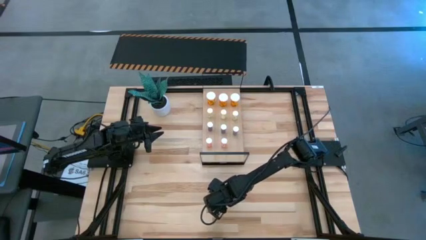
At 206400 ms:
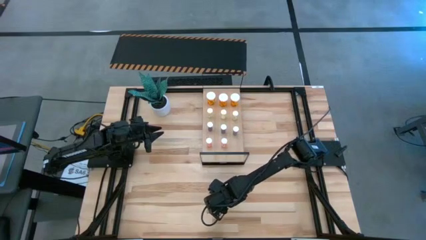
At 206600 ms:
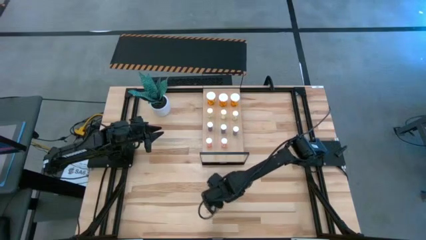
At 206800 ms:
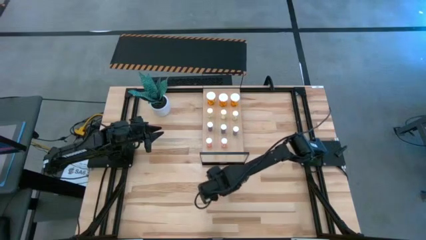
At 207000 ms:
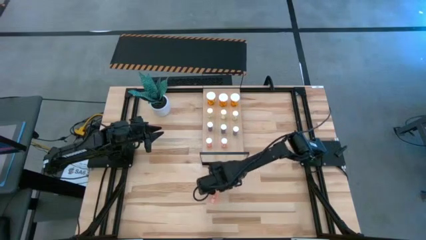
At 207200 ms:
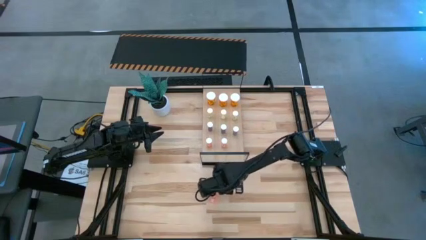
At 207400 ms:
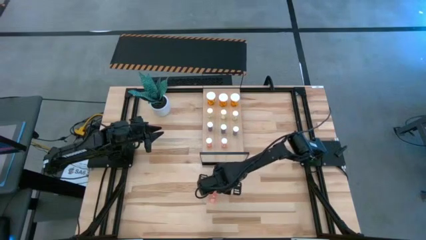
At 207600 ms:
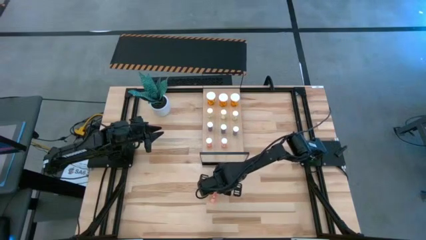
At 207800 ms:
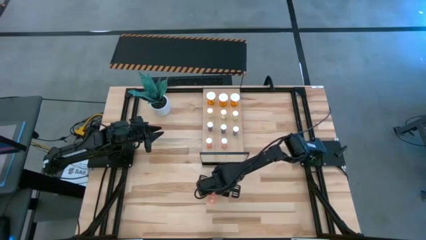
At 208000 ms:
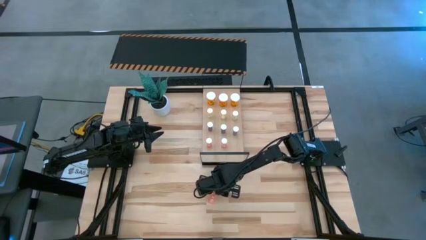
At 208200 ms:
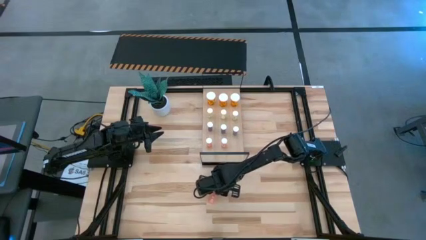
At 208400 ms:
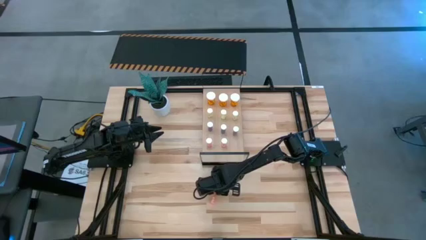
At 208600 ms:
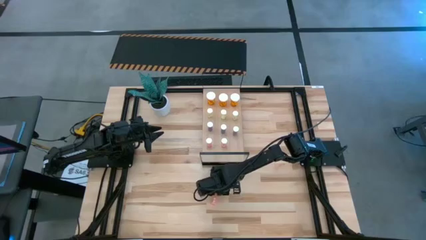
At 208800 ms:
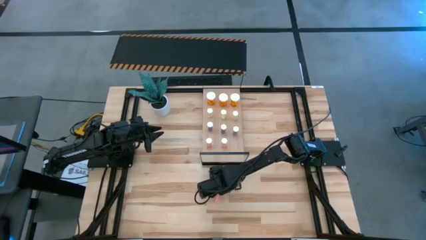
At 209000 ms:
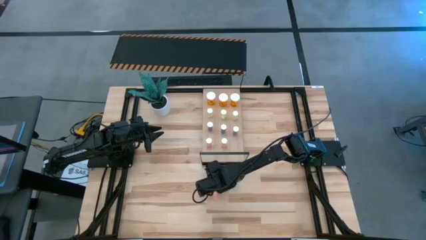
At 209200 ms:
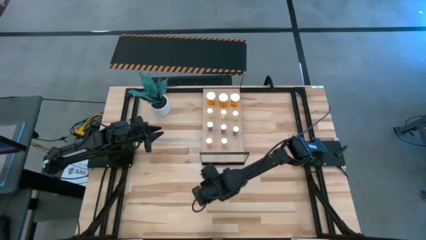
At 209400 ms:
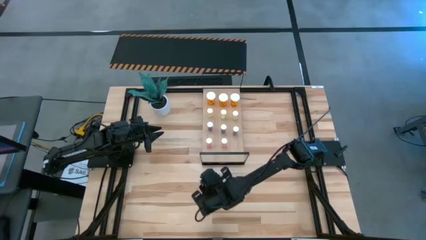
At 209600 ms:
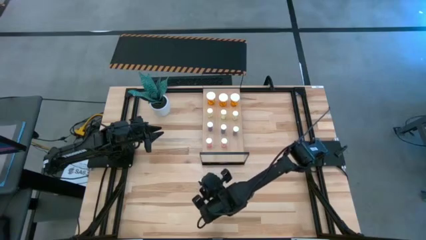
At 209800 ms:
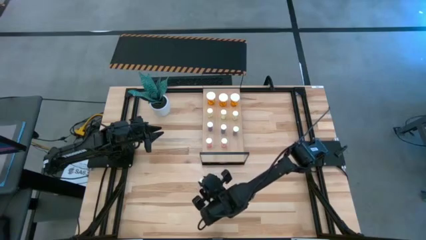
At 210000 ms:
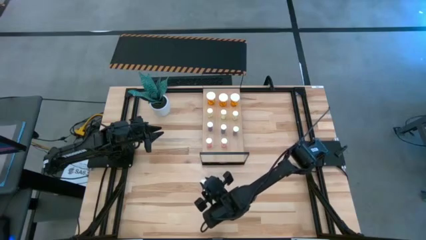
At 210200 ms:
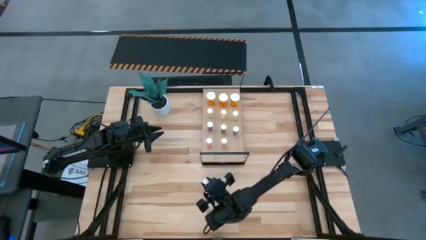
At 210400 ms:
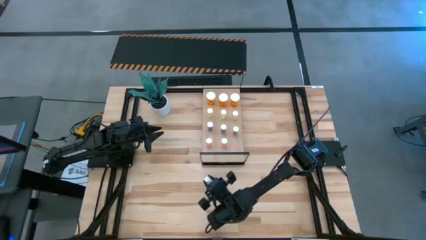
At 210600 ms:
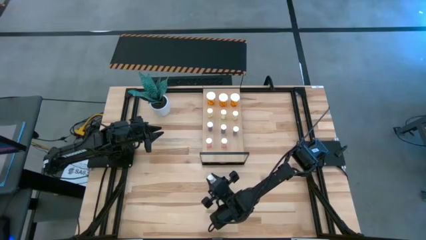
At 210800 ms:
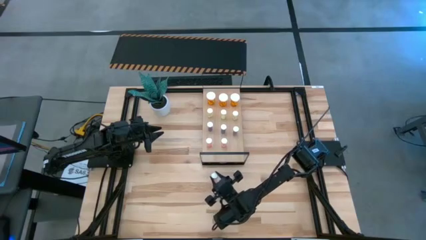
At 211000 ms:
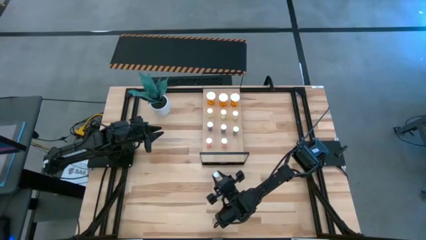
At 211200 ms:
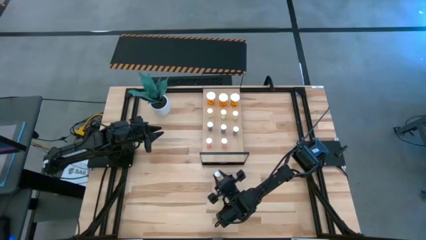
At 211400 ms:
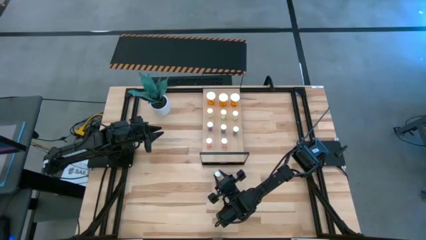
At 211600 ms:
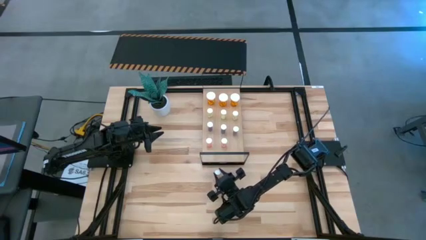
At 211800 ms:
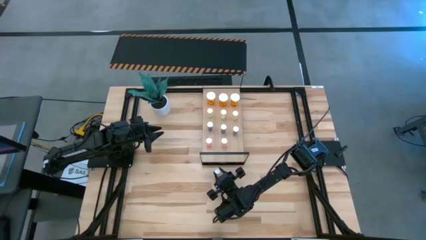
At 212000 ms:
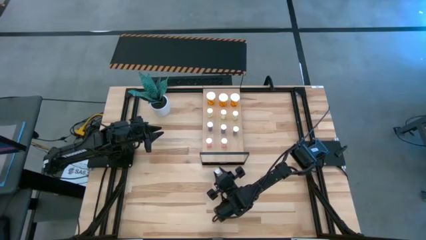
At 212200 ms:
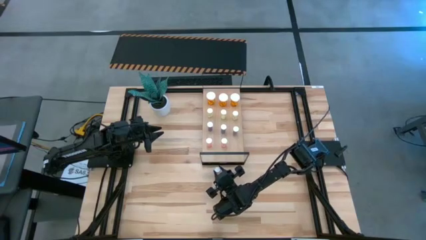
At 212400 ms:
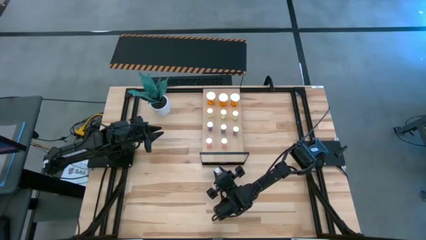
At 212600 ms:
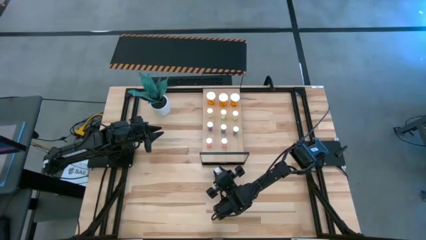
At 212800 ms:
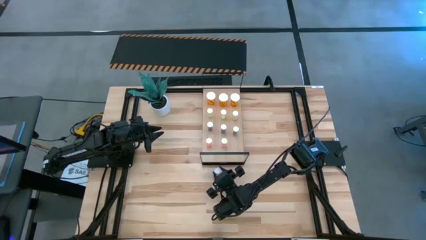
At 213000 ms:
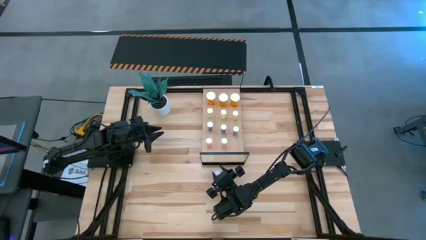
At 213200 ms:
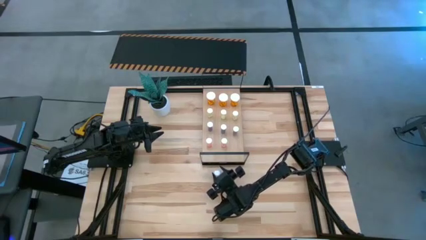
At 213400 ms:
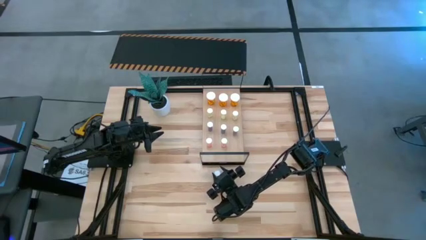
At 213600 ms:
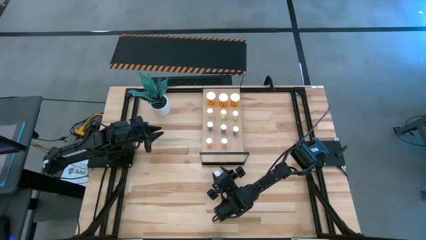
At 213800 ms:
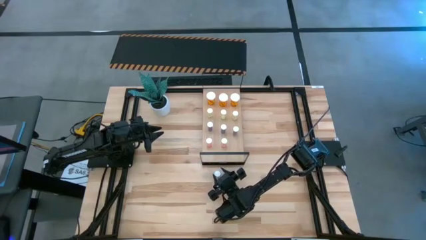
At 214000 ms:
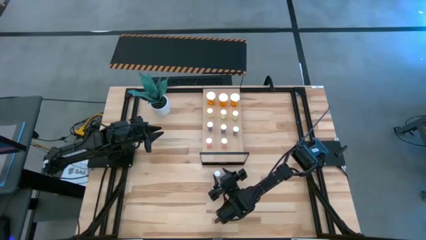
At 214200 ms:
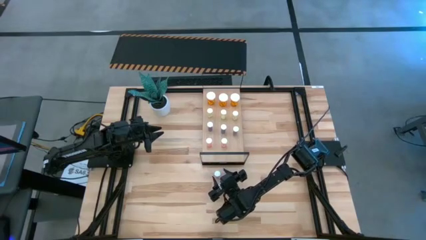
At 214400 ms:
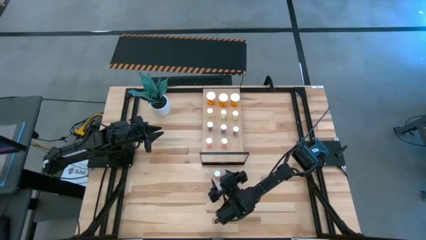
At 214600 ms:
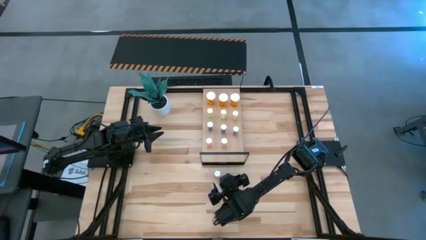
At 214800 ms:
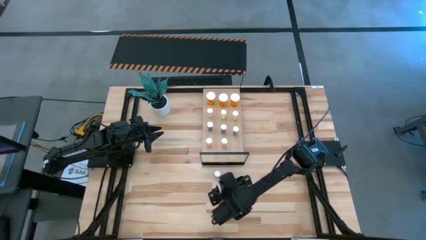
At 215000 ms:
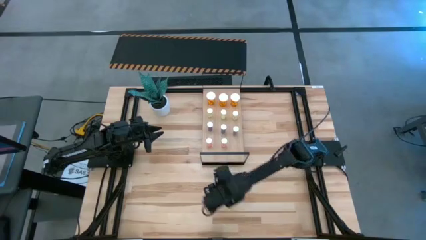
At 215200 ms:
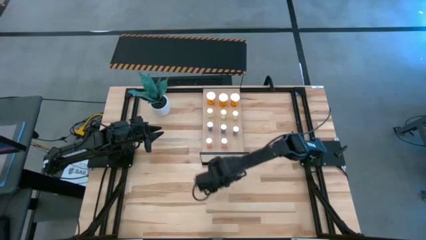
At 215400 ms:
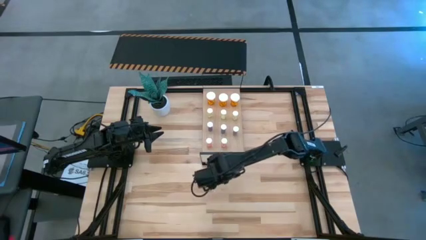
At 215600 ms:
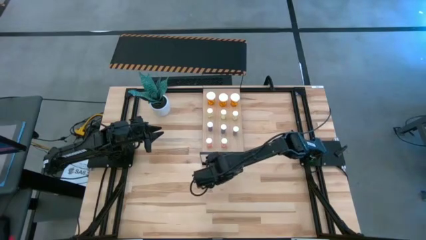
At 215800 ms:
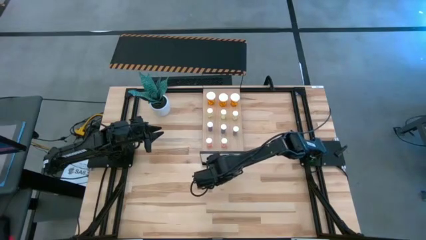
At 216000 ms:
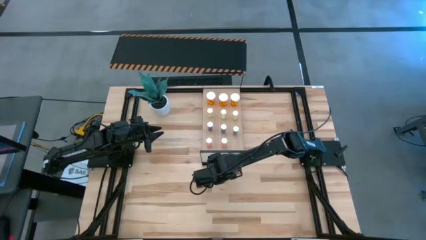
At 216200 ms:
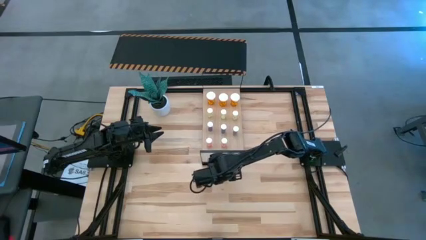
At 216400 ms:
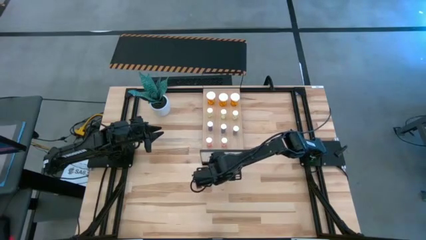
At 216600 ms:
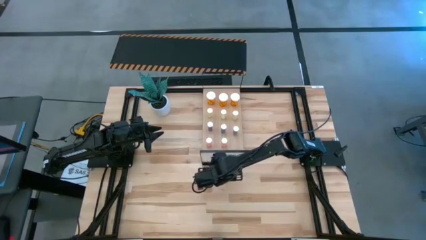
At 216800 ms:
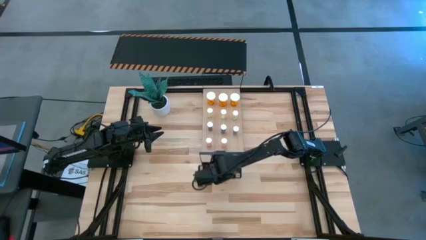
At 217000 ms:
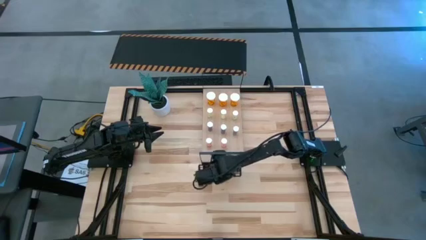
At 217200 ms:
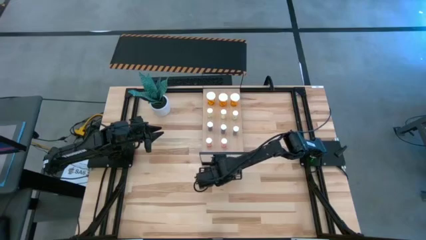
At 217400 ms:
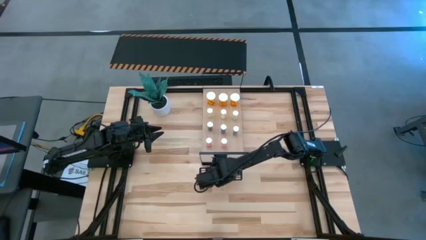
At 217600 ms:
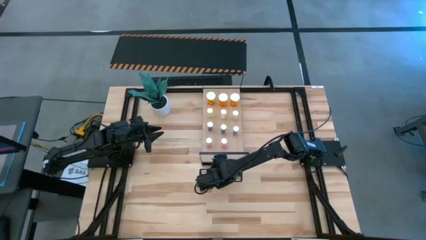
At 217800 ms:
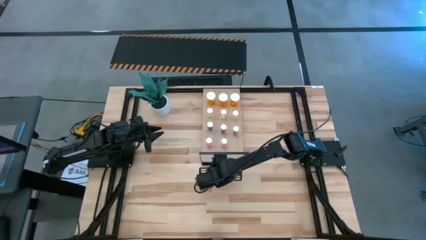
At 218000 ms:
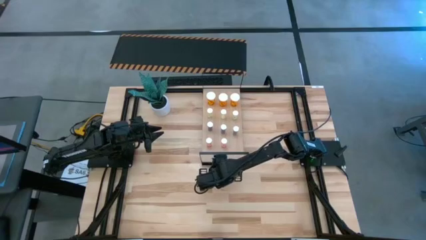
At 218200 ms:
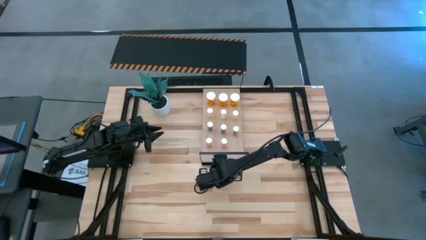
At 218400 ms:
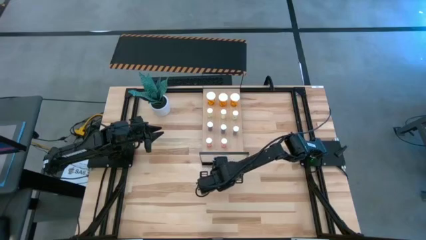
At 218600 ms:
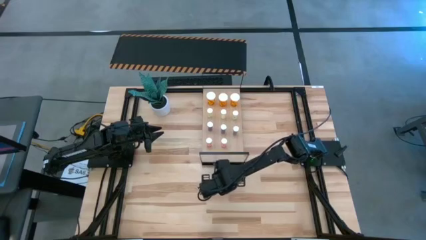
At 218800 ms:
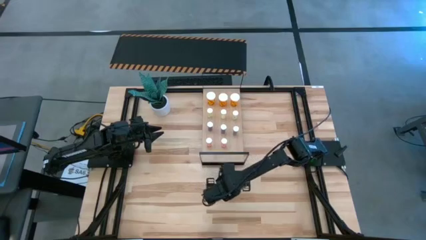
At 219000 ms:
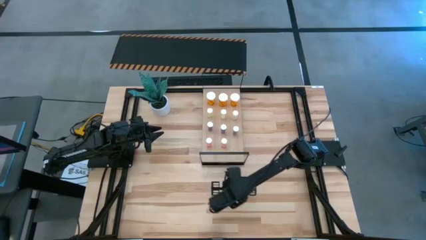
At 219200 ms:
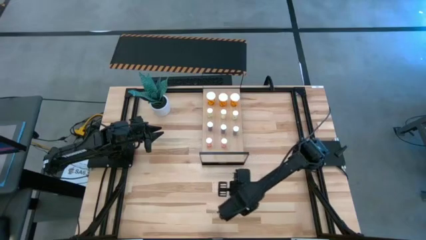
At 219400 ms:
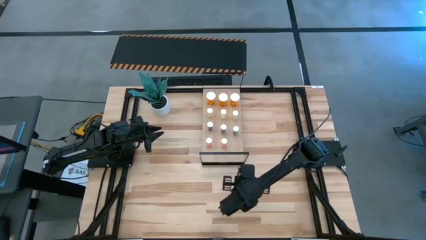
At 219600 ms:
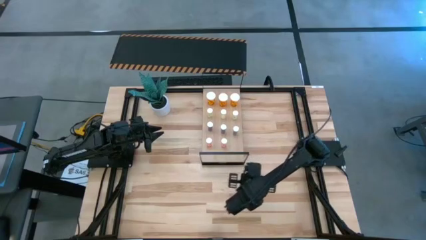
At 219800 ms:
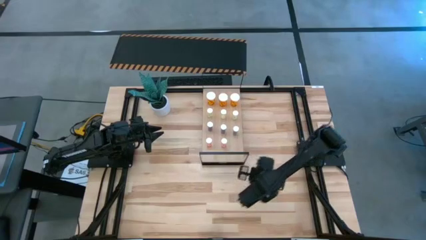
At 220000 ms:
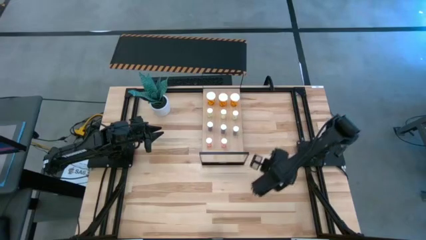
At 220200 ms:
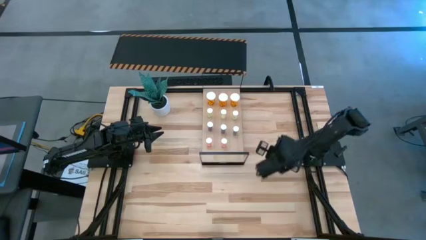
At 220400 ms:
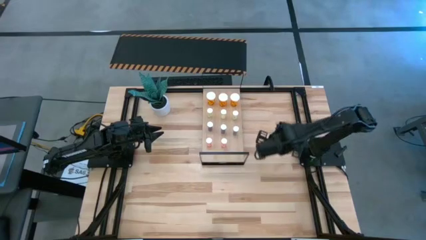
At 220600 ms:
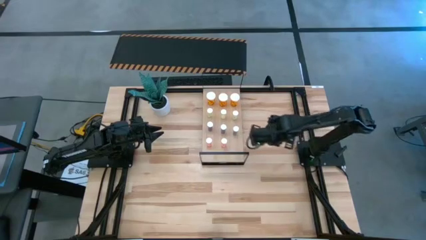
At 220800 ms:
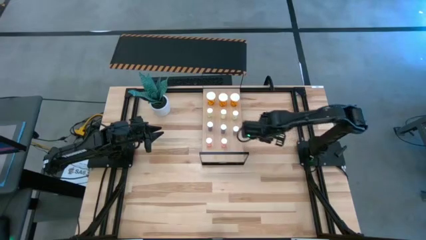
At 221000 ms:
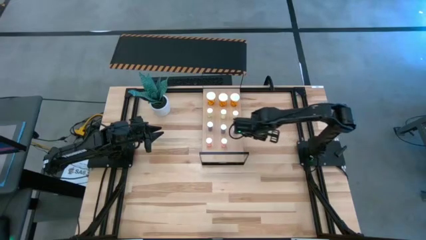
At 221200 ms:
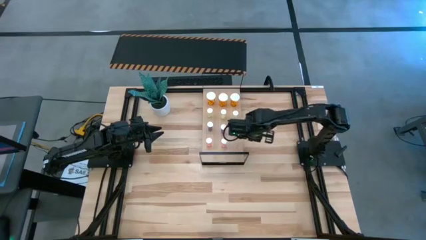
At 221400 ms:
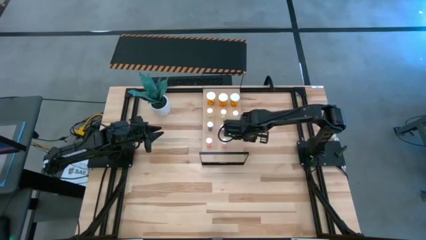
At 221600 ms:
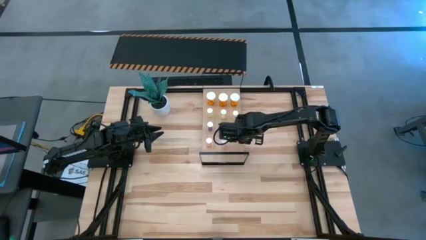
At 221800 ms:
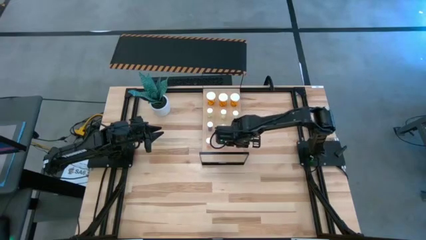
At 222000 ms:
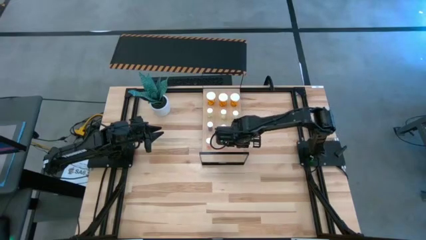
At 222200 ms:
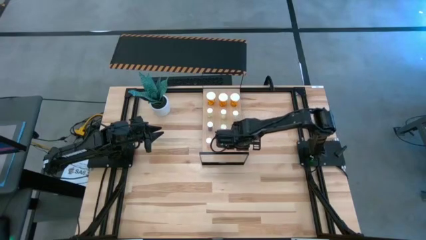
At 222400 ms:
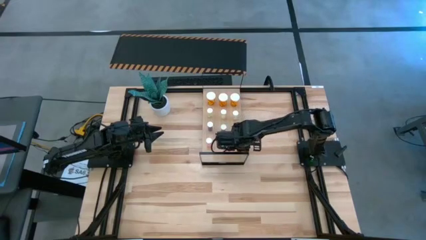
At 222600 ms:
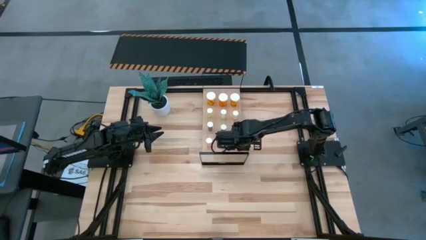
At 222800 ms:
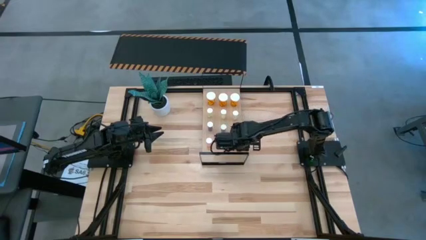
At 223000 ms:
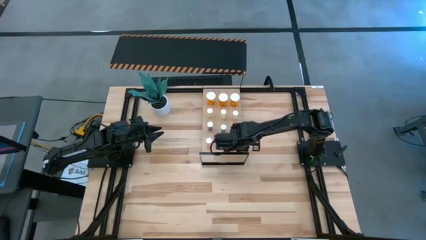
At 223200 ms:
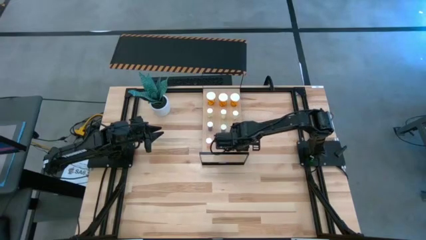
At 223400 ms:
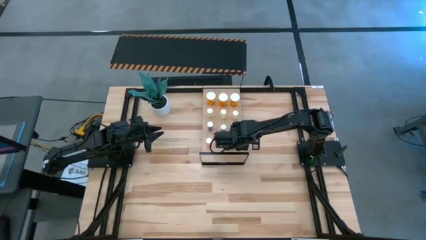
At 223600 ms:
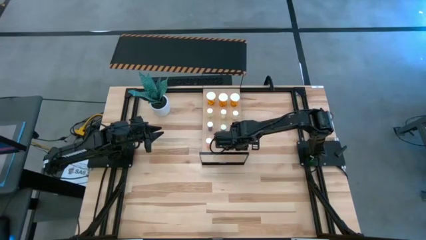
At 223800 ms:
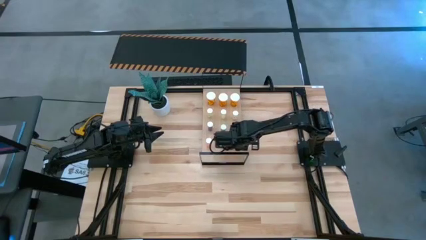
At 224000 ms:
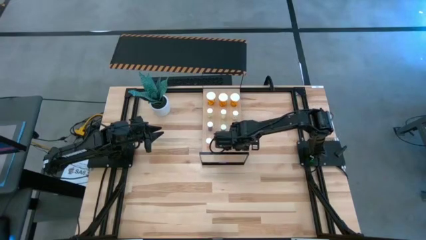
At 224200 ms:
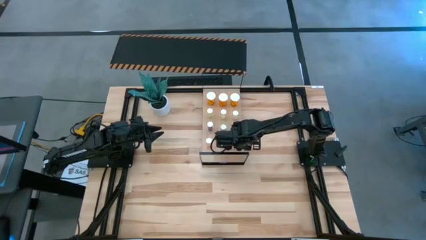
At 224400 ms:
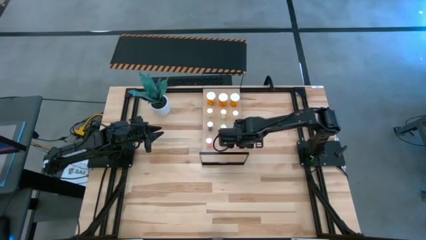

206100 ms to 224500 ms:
Task: Pick and place medicine bottles onto shelf by color
Put the small pink pill bottle on the shelf aligned with the other small pink pill bottles
